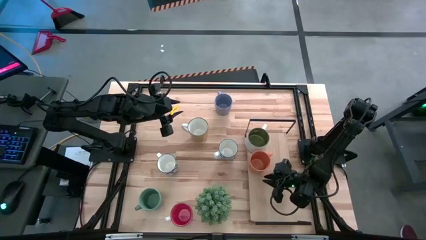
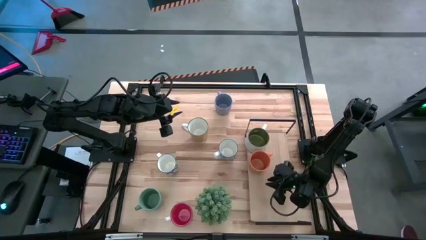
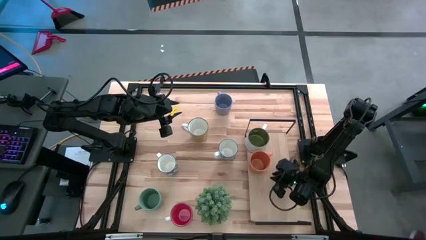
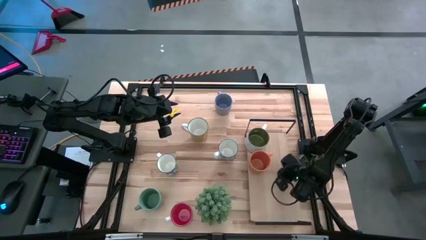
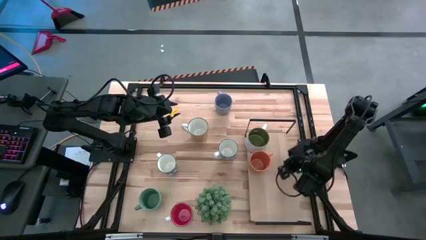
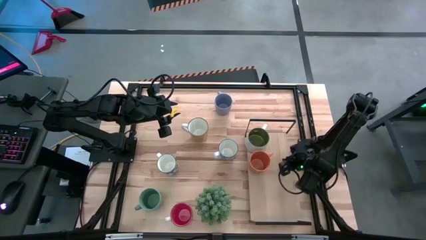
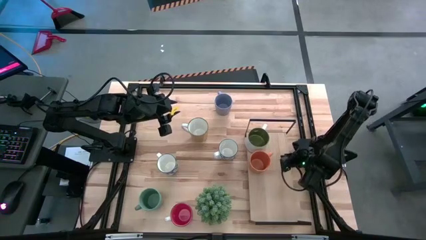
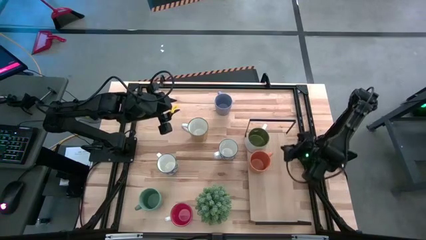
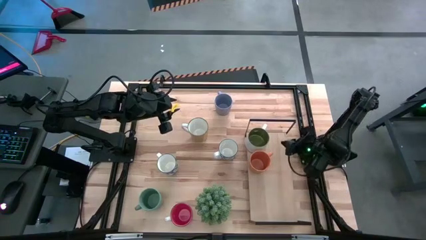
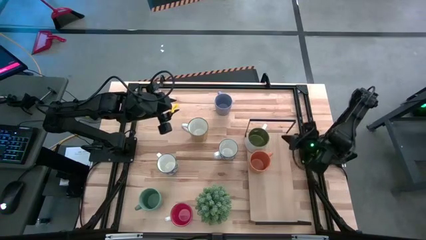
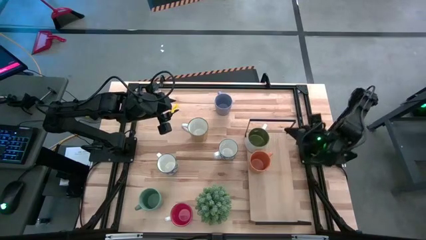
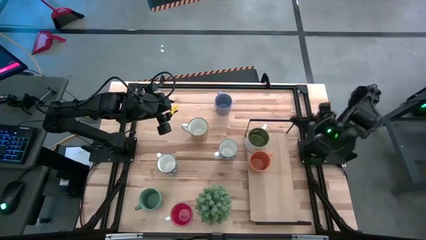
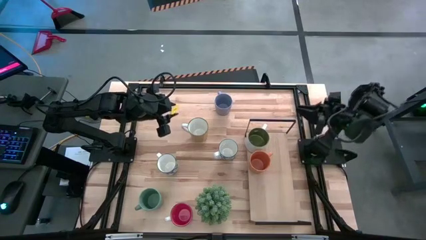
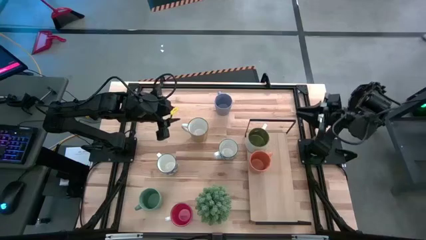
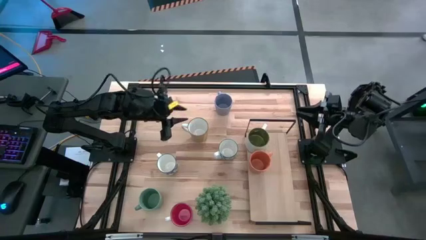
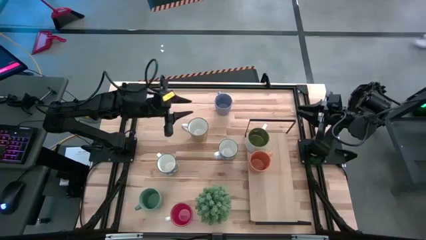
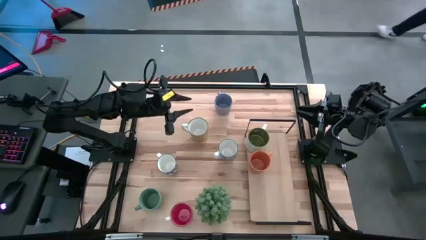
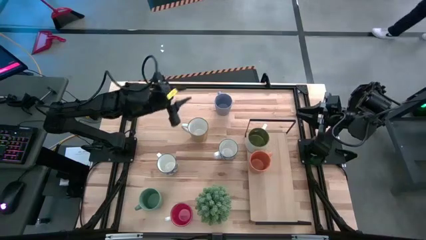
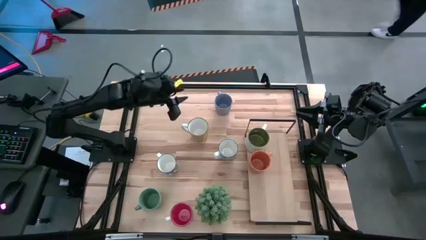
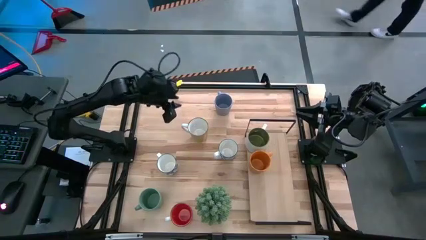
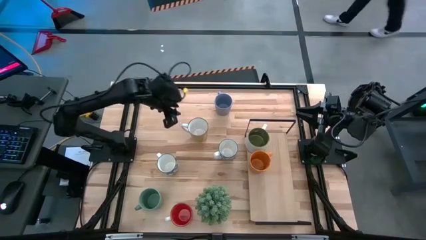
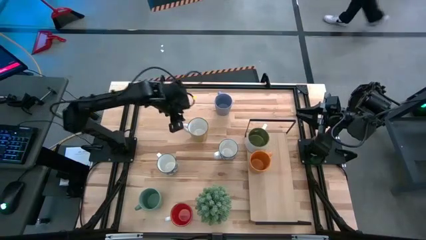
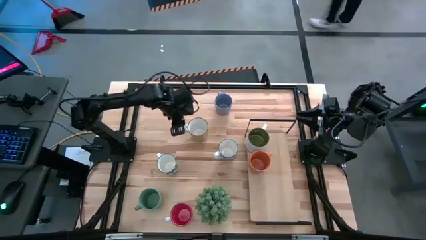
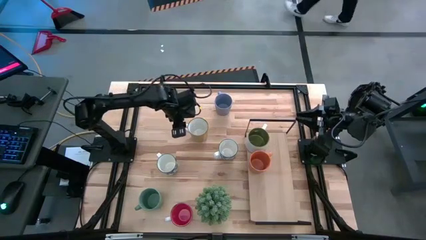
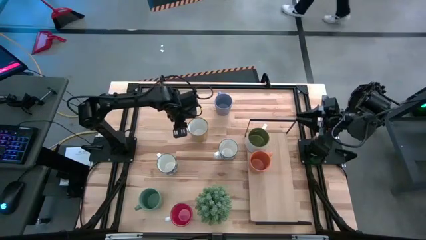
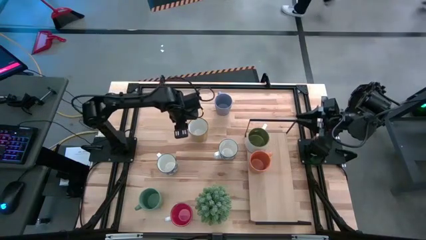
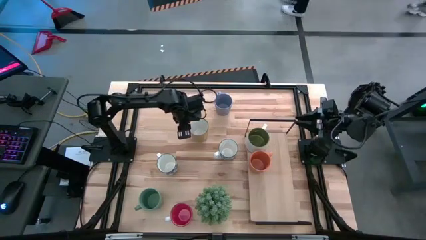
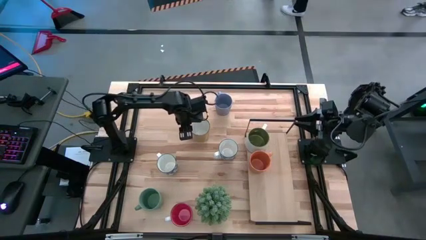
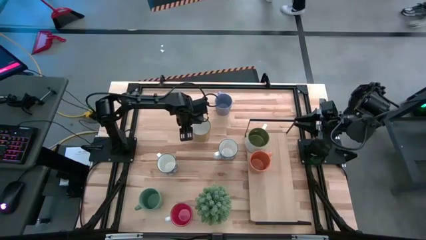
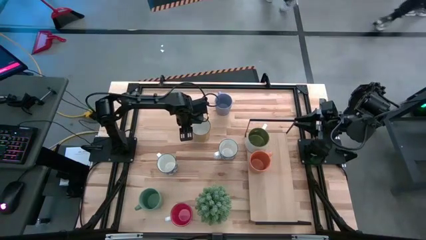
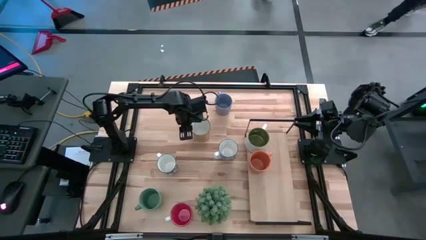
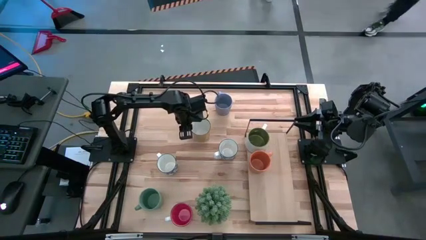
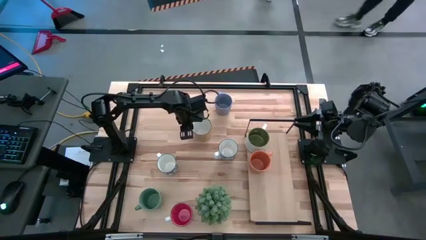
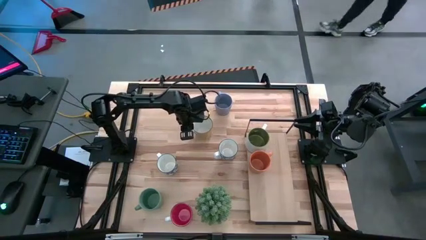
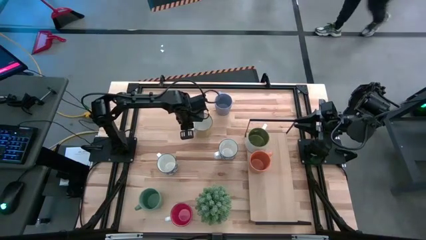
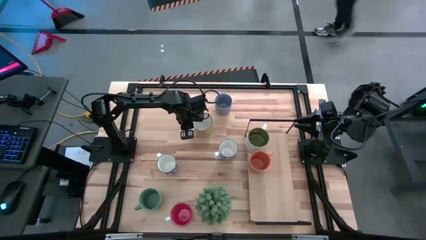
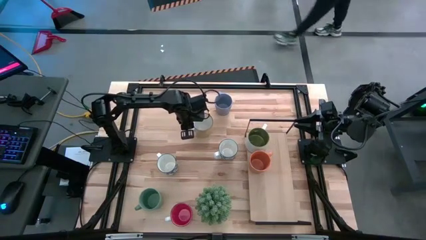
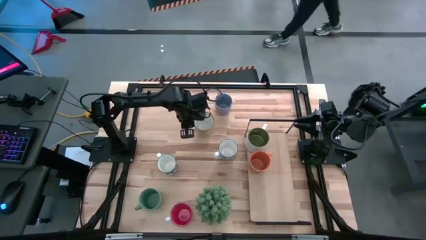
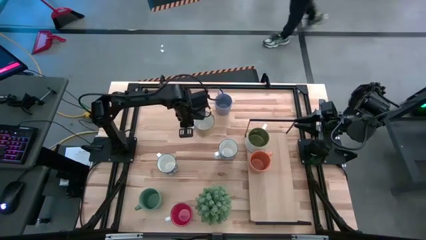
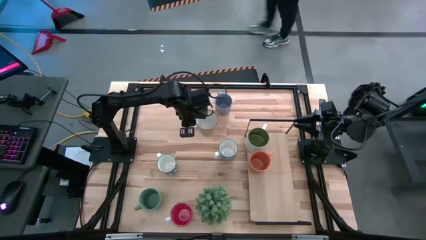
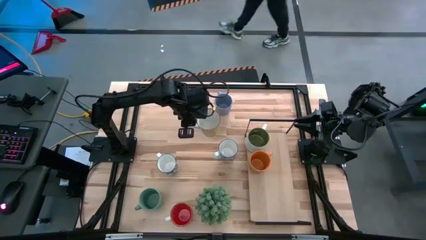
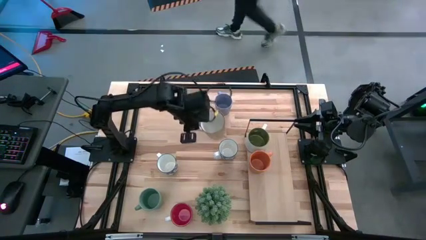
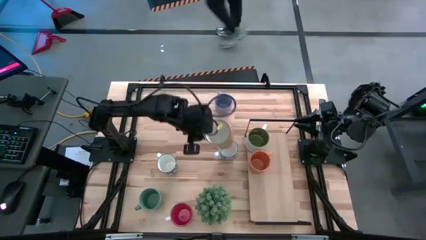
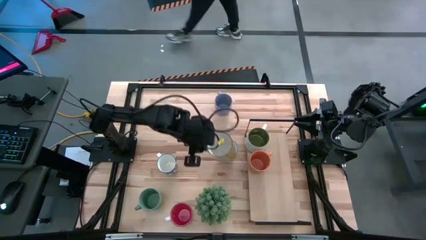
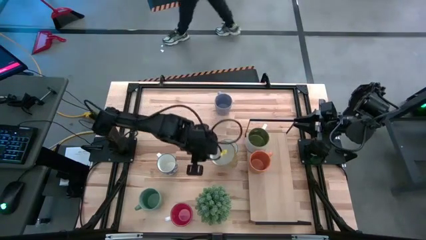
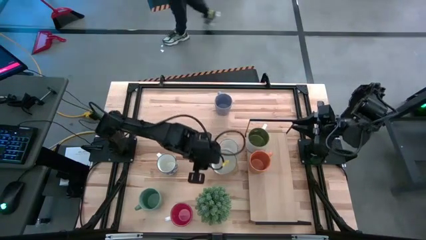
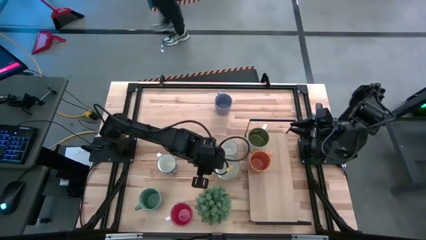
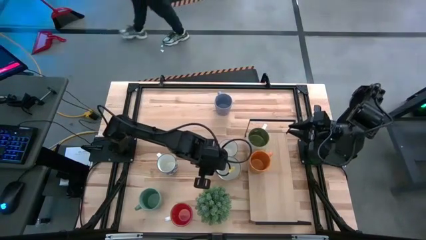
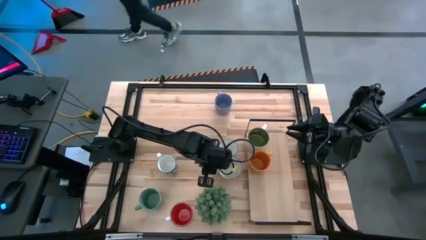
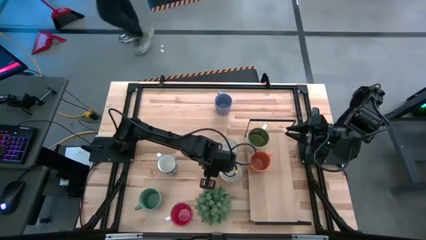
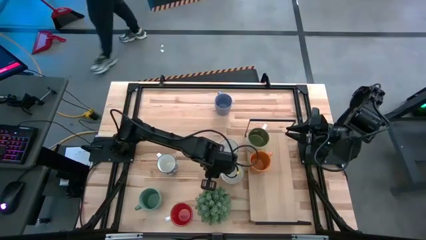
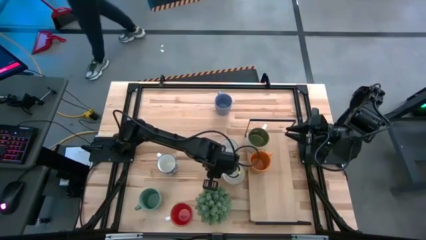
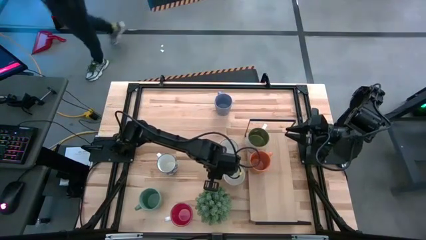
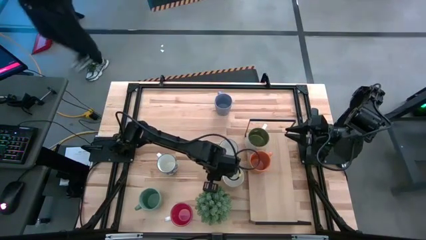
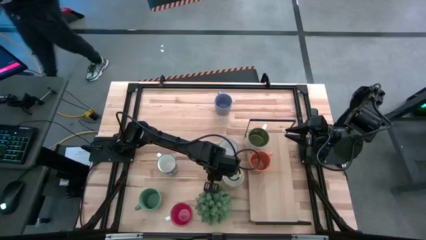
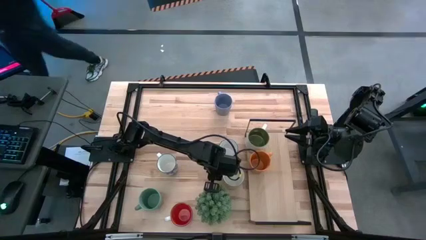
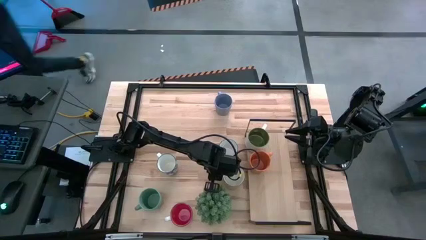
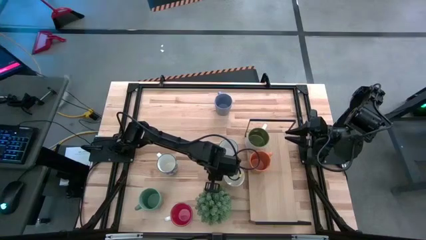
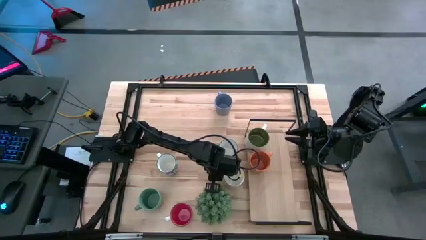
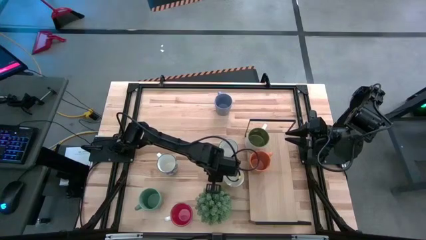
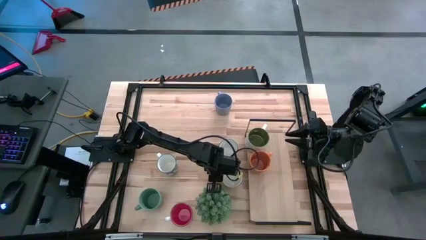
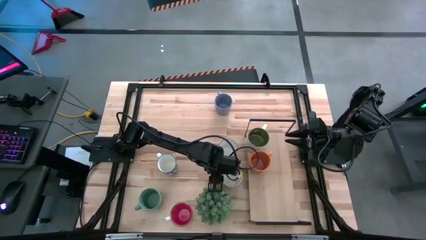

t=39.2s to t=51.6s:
Task: Place coffee mugs
Move the yellow mug to the center of the table
